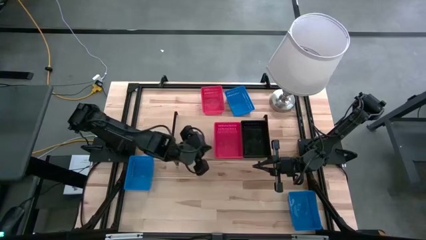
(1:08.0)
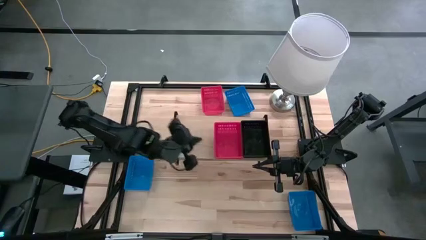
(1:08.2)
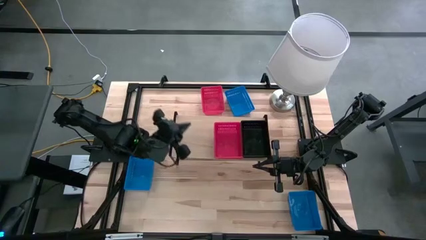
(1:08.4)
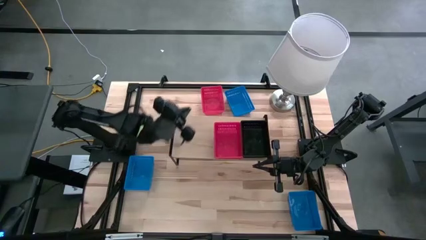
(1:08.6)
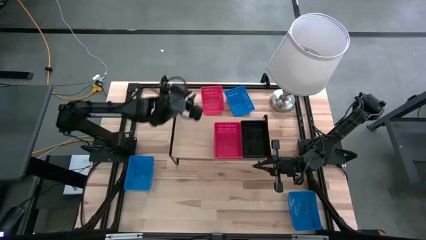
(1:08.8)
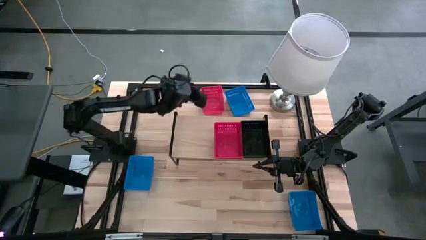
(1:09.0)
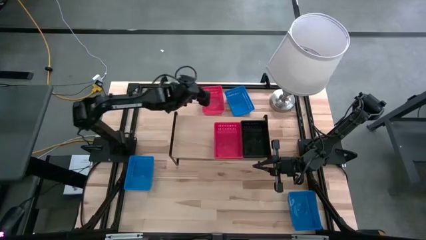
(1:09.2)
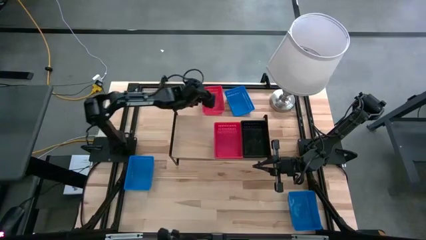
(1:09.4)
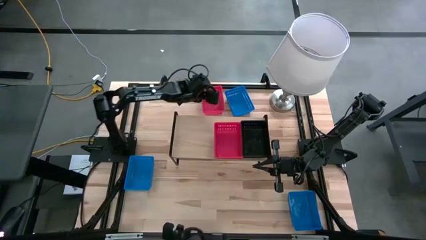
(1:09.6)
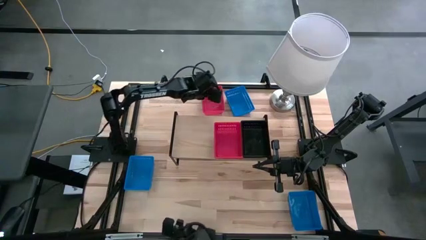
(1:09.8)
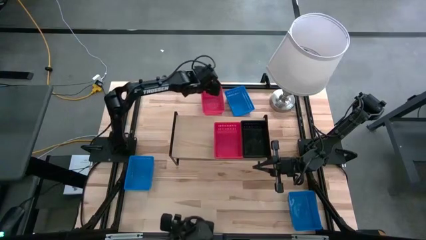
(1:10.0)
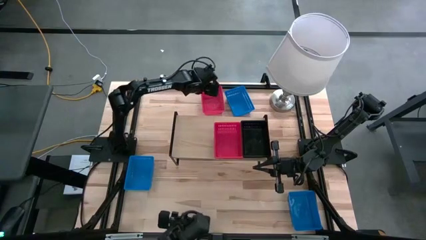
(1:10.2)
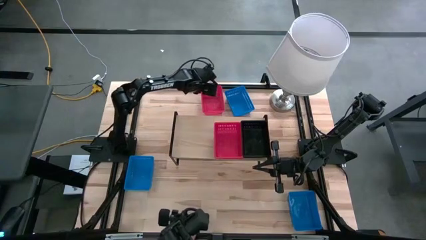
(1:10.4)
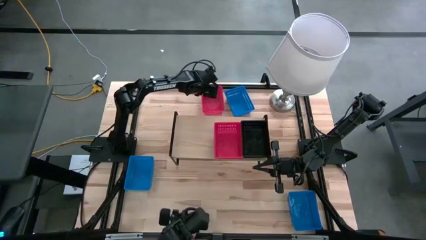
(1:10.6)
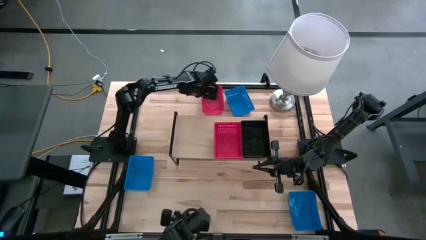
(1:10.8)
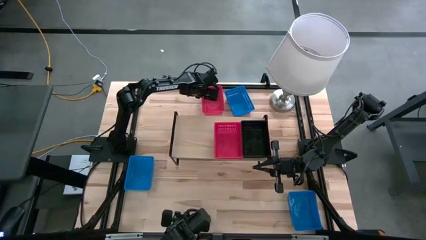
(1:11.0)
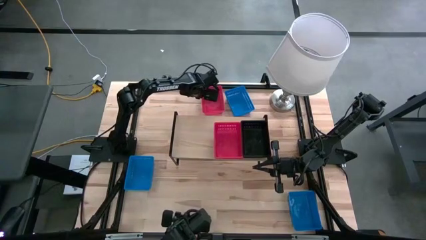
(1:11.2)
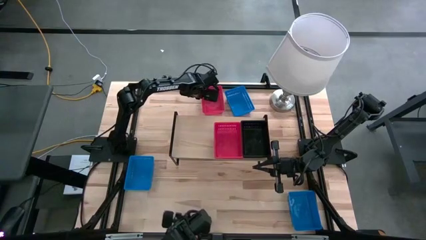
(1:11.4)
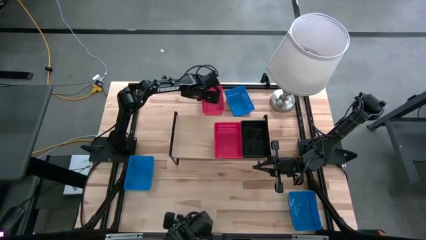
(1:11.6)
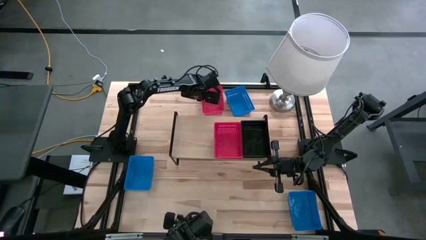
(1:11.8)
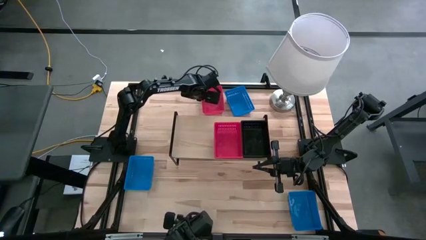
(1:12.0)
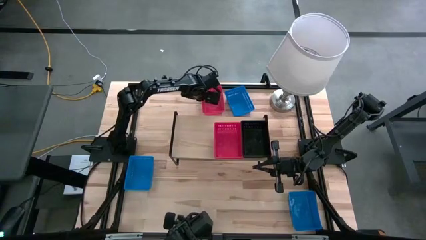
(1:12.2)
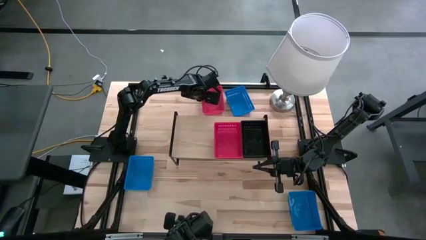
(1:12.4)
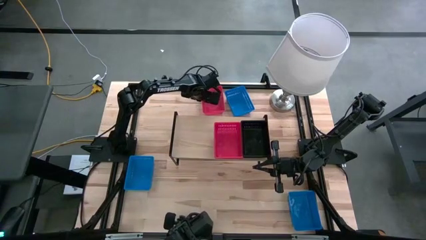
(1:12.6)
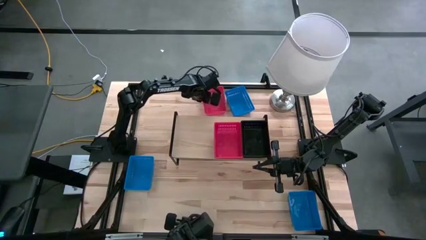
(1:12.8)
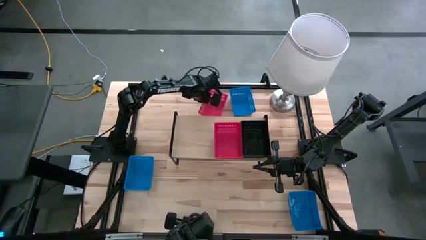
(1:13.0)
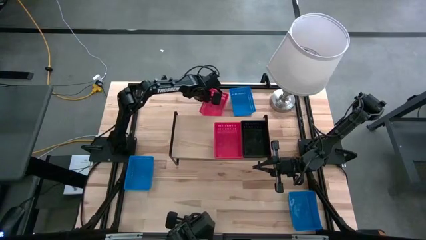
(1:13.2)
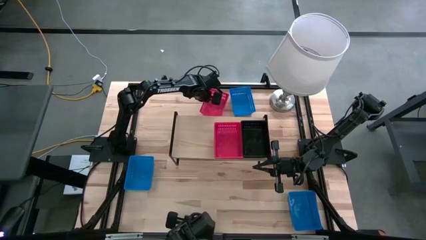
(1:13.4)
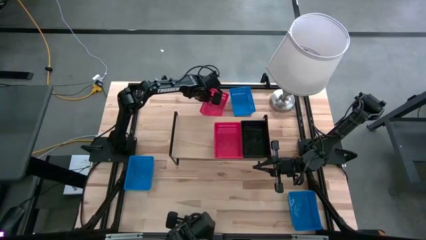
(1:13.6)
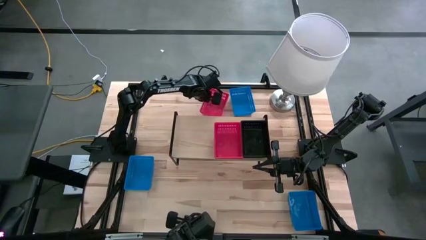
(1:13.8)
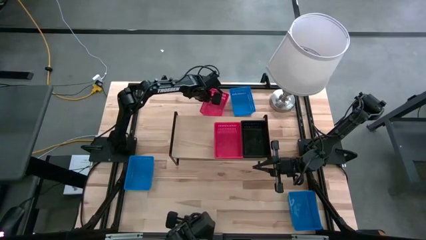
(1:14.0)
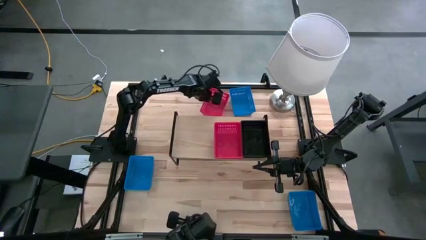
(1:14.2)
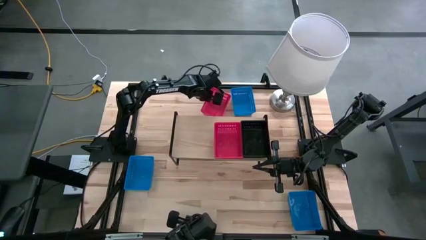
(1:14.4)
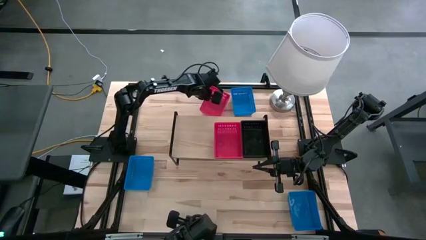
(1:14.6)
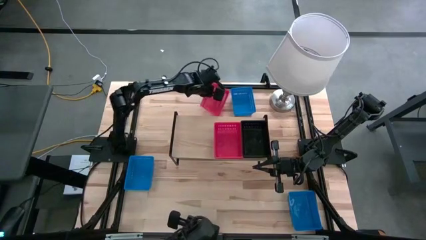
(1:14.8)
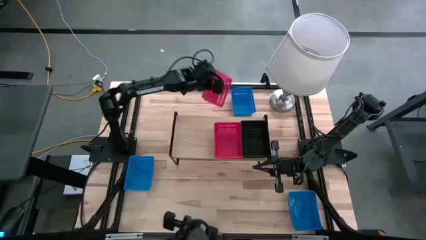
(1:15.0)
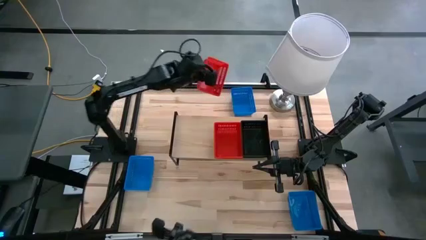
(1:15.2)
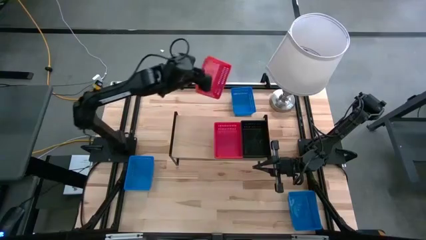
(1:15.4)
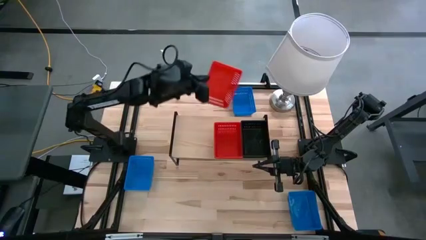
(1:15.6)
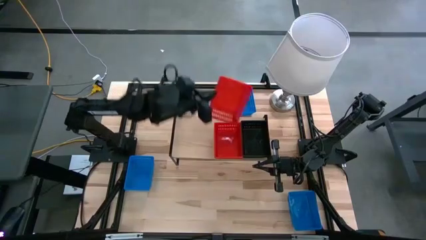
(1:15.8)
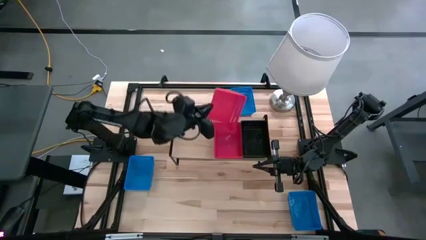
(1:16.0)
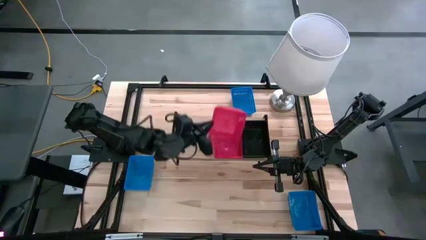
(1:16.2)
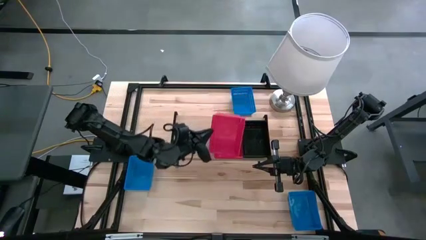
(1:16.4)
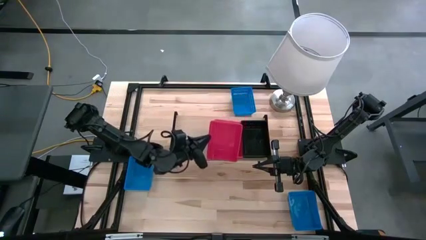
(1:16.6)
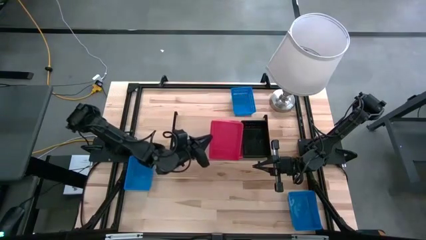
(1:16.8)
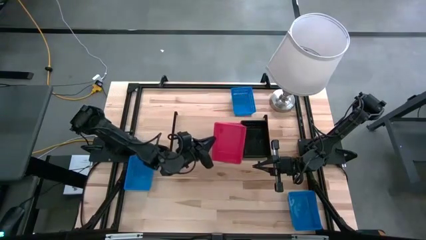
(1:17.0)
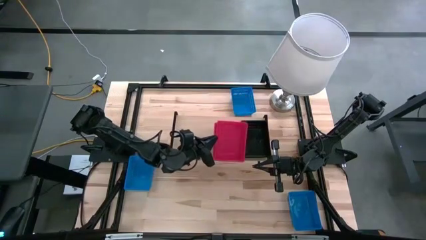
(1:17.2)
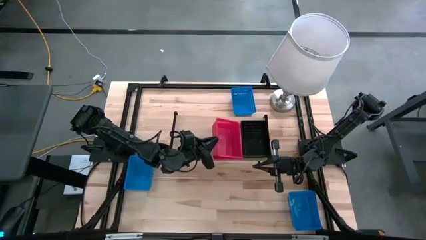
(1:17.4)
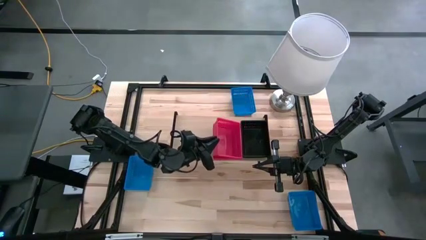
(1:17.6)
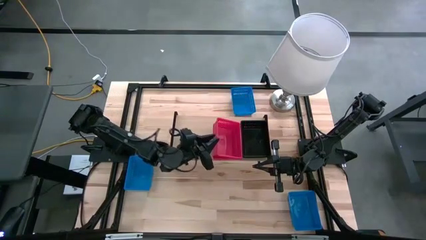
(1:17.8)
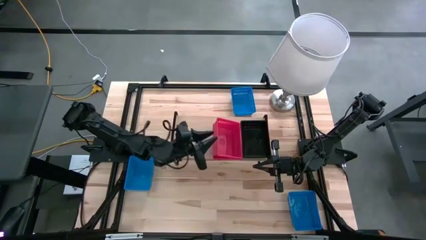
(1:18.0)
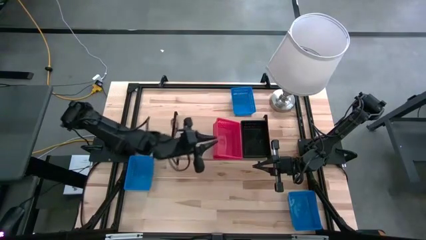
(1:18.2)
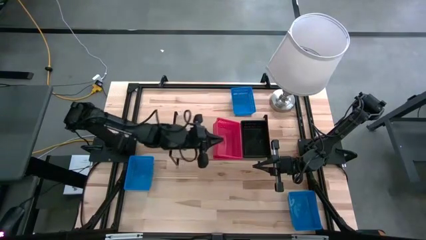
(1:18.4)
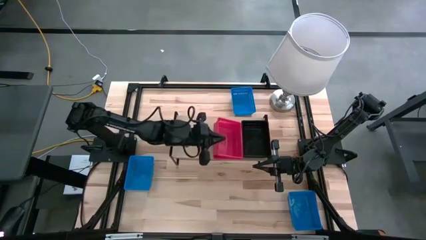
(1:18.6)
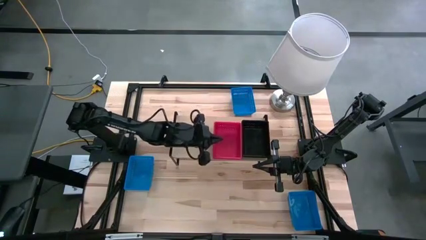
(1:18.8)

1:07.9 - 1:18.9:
Task: Stack baskets on shelf by color
Stack the red bin on the red bins on the shelf

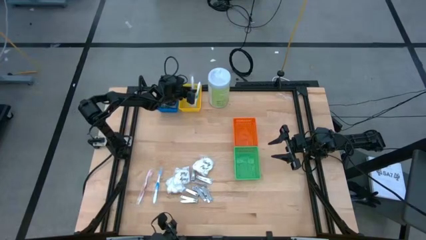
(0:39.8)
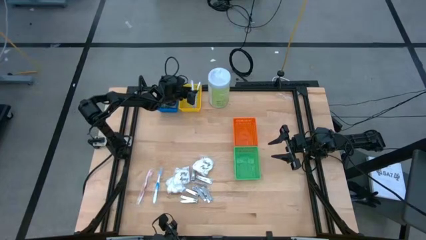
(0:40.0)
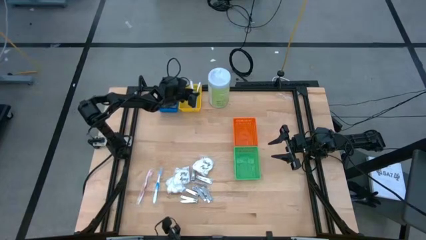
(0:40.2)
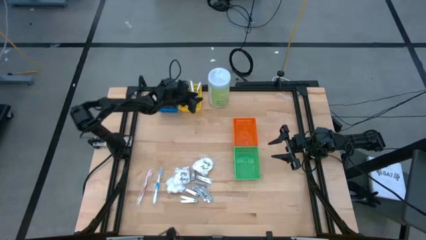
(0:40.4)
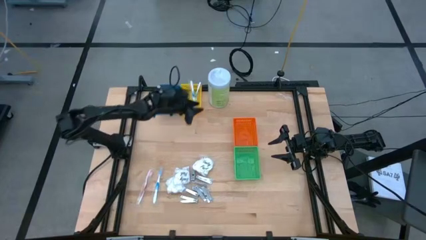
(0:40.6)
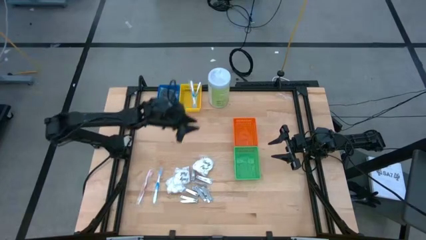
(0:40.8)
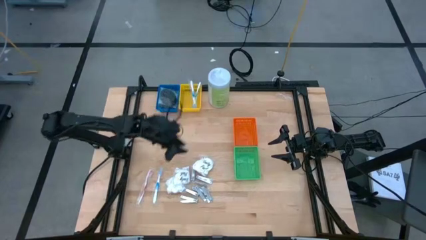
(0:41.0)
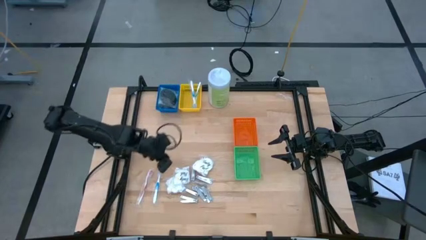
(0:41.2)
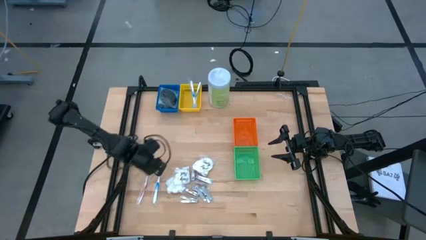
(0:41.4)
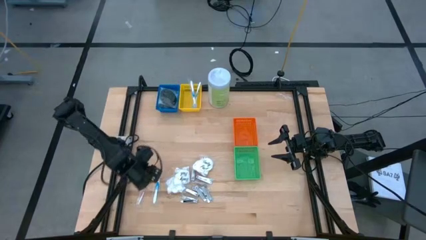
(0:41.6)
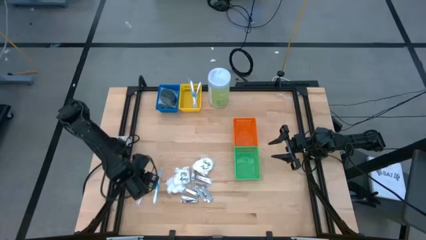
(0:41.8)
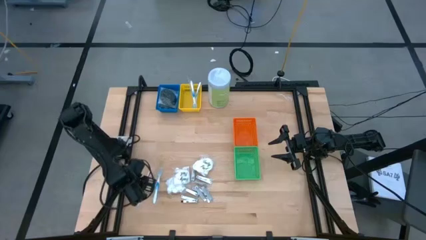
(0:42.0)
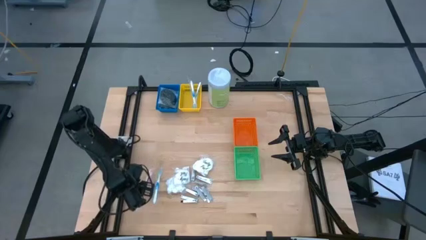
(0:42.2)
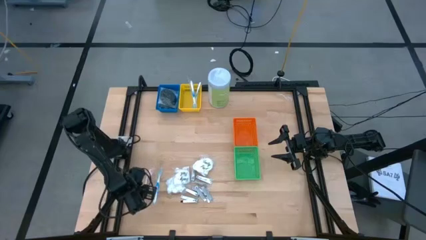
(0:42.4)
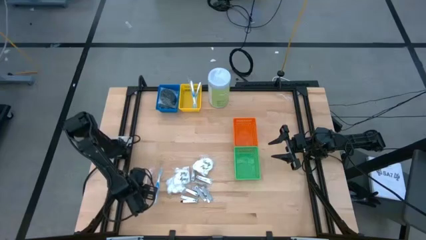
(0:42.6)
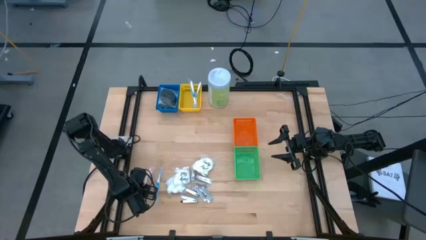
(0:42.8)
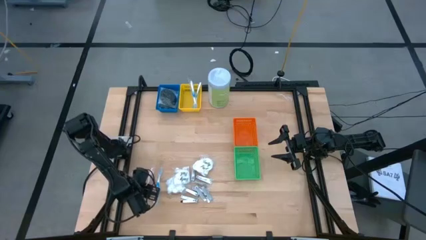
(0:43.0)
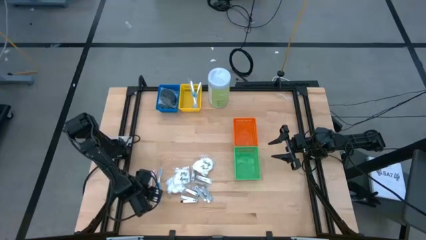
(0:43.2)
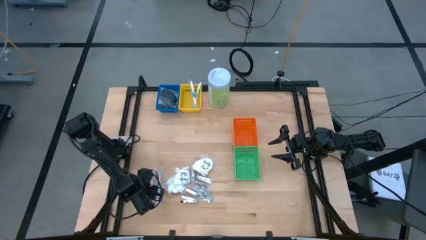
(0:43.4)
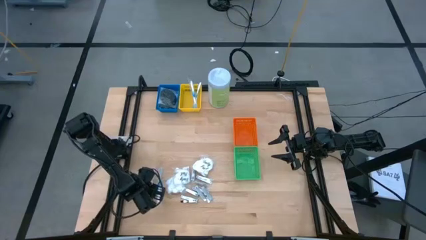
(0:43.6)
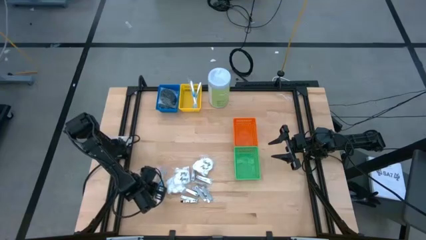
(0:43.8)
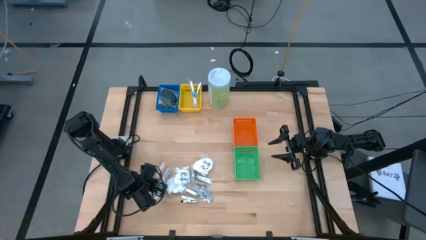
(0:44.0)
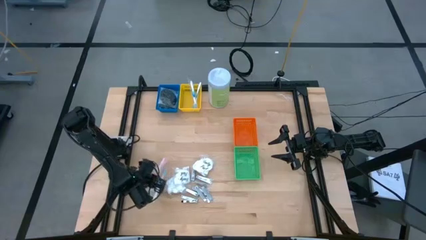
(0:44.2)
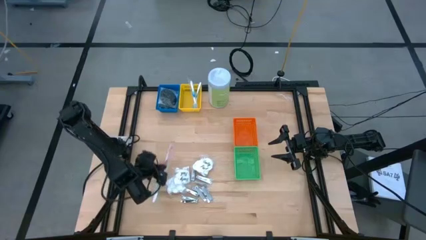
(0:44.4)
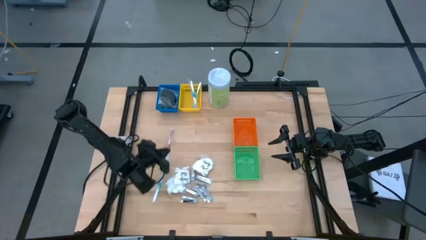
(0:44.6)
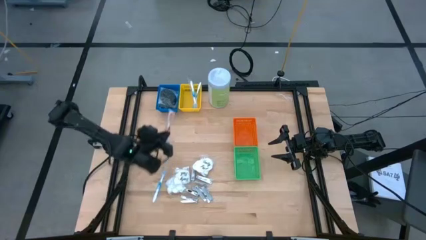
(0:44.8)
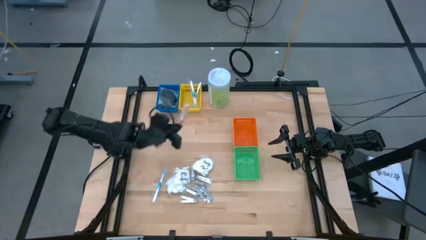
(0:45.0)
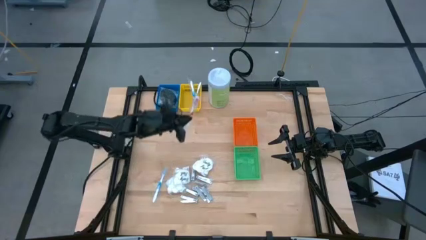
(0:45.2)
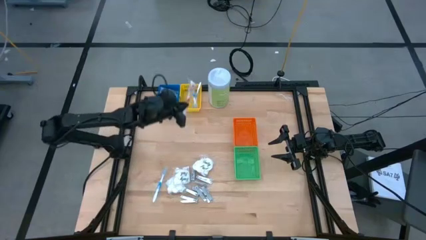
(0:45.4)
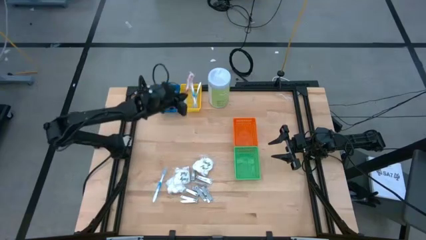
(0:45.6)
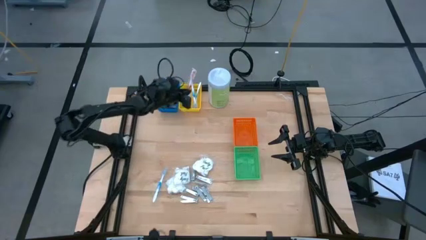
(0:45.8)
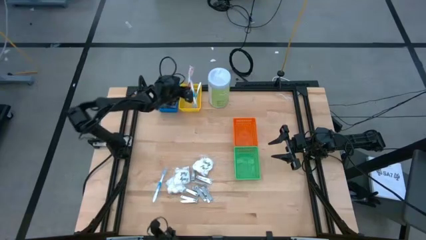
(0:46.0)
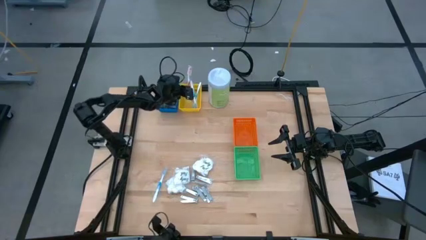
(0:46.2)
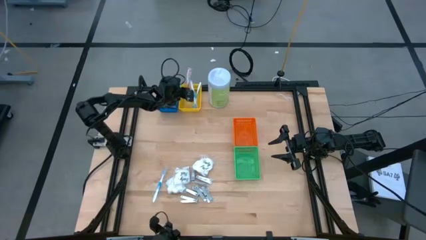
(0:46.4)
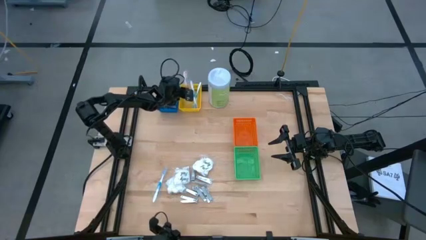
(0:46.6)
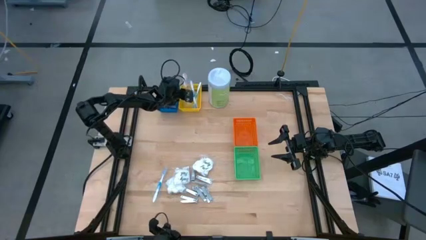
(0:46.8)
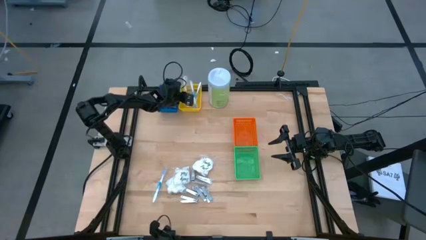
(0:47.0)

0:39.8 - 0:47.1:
Task: Pick & Place Travel size toiletries
Put the red toothbrush into the yellow bin
